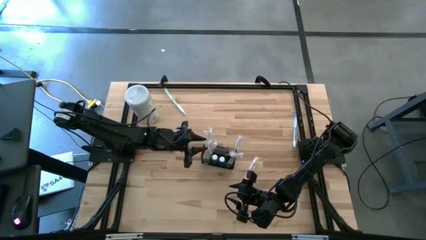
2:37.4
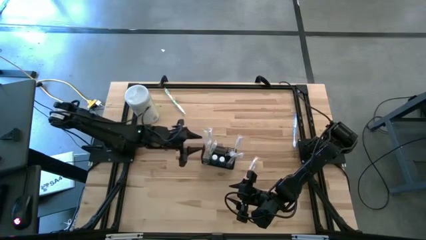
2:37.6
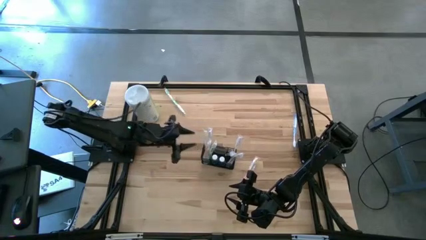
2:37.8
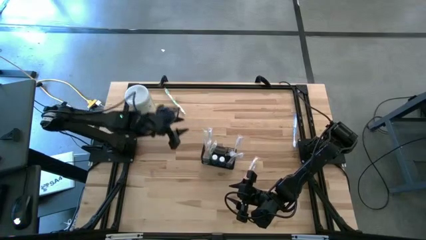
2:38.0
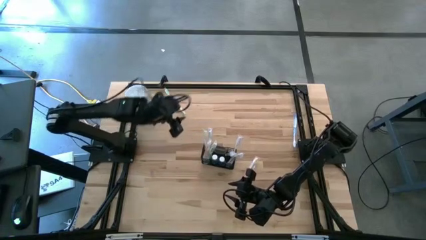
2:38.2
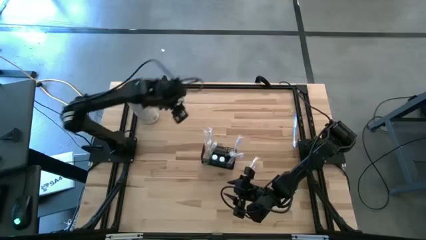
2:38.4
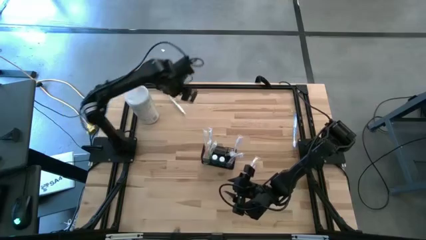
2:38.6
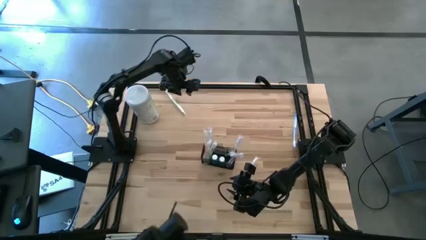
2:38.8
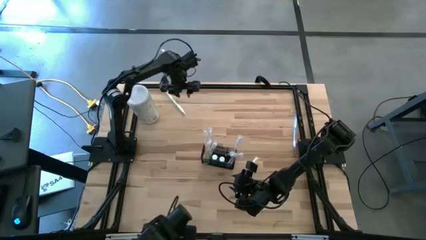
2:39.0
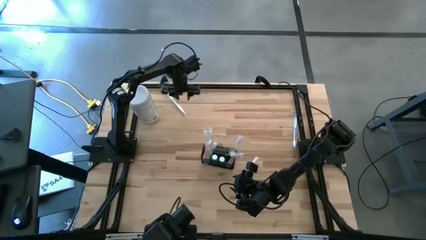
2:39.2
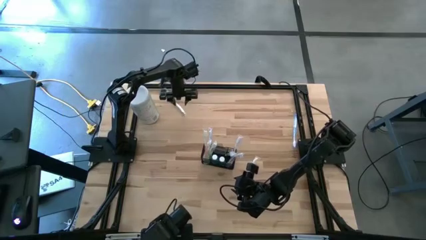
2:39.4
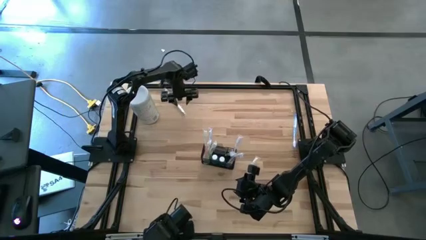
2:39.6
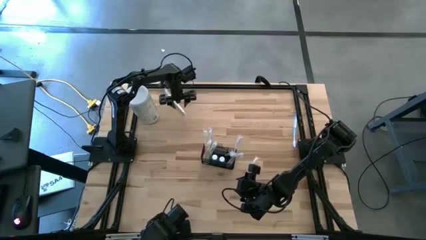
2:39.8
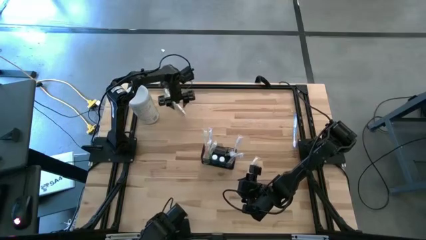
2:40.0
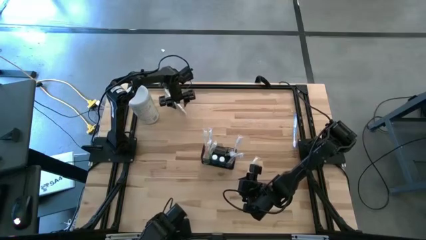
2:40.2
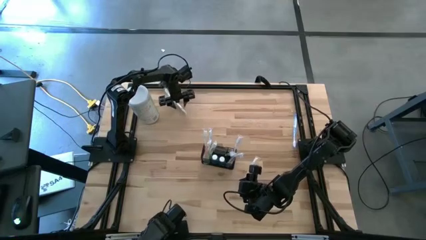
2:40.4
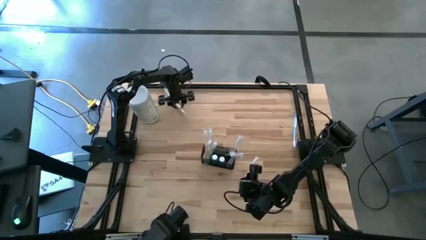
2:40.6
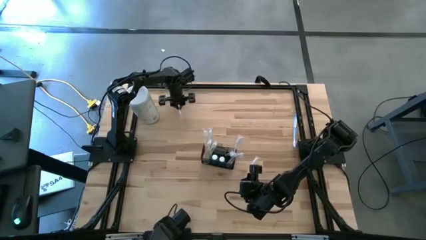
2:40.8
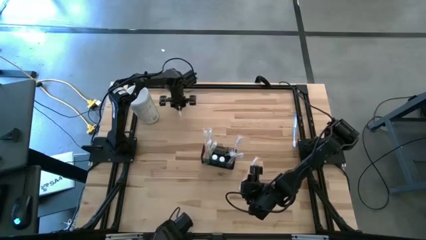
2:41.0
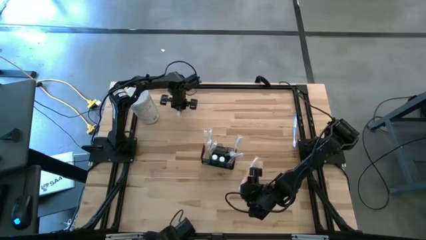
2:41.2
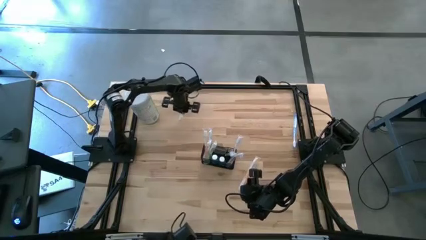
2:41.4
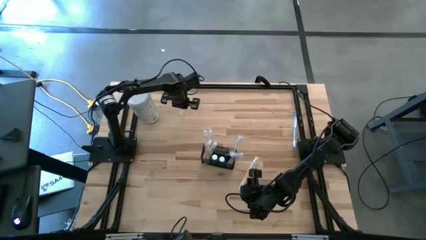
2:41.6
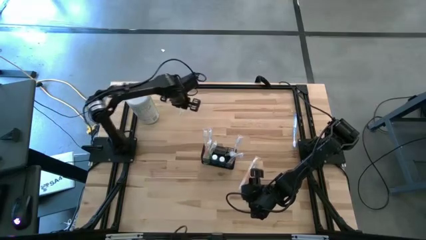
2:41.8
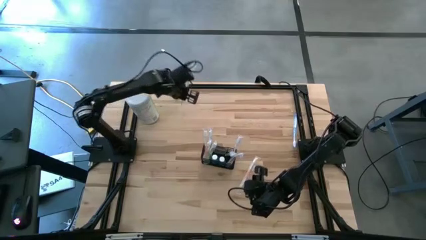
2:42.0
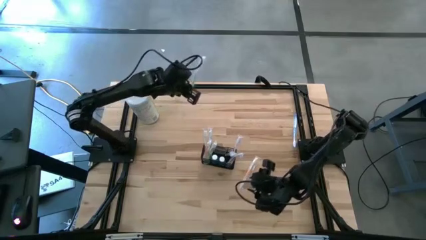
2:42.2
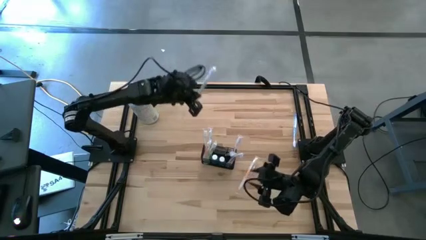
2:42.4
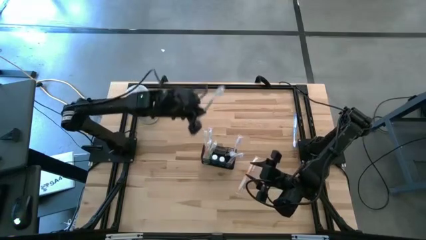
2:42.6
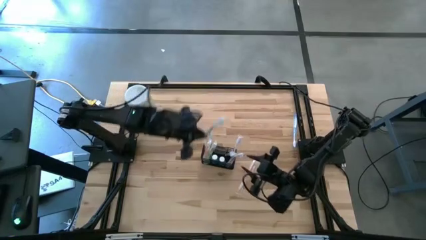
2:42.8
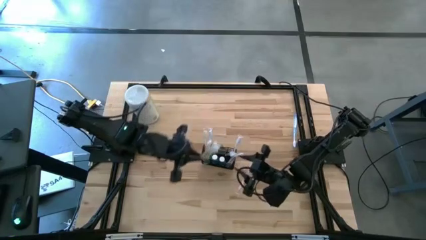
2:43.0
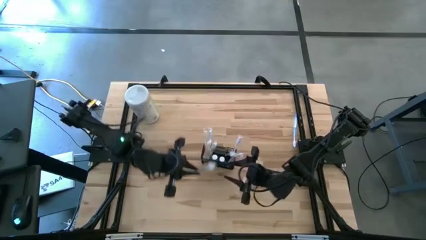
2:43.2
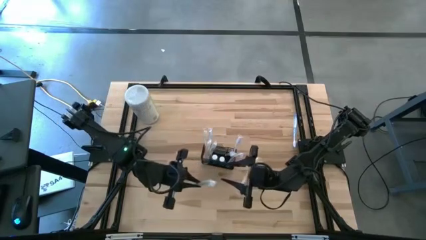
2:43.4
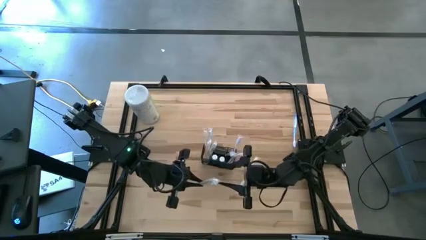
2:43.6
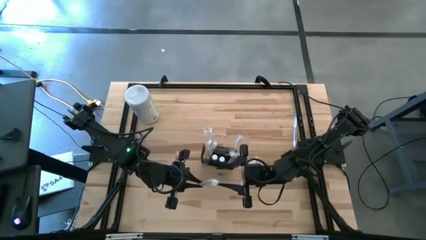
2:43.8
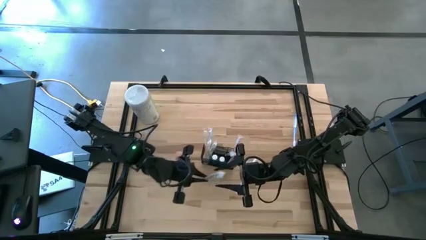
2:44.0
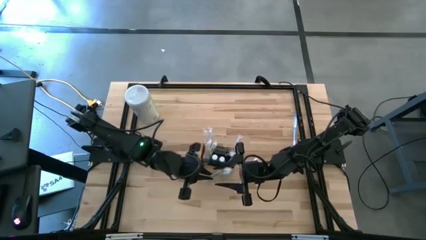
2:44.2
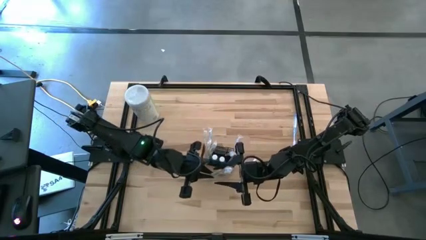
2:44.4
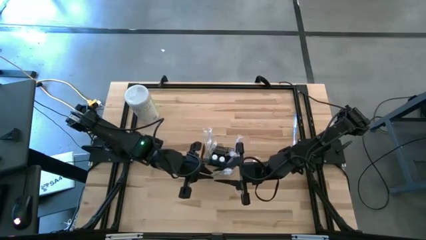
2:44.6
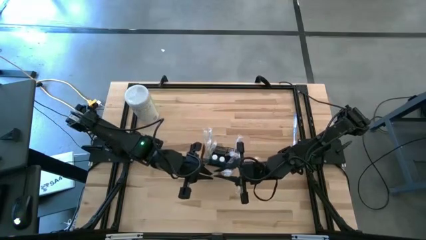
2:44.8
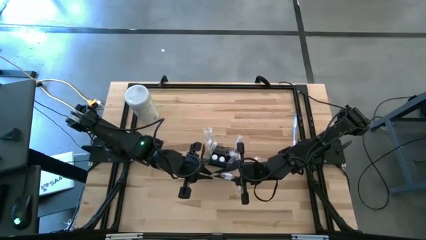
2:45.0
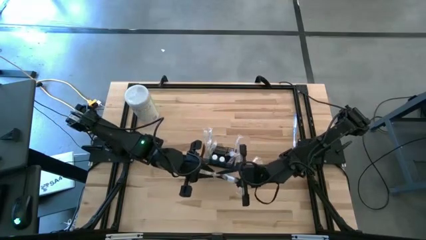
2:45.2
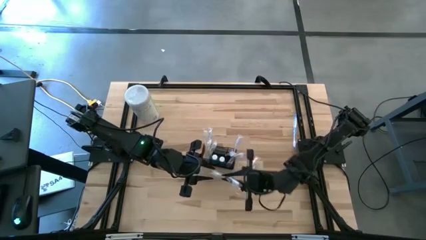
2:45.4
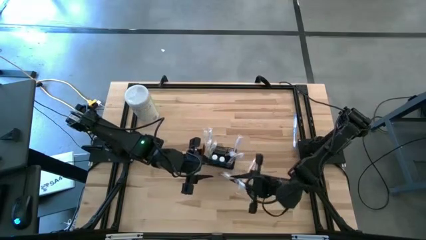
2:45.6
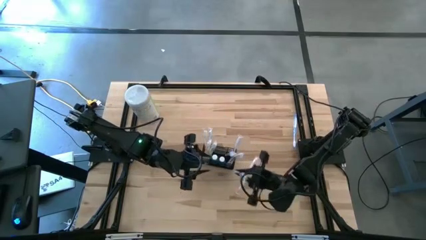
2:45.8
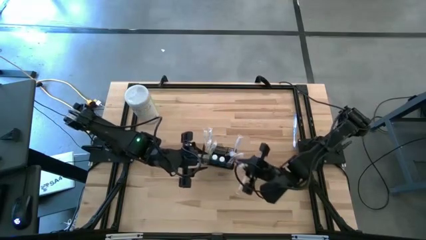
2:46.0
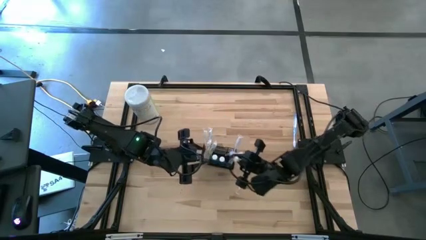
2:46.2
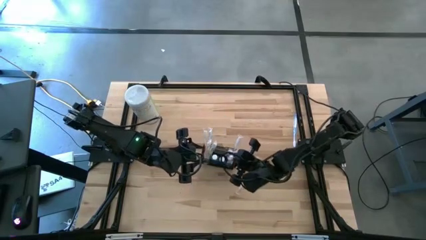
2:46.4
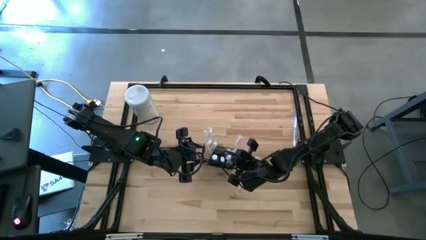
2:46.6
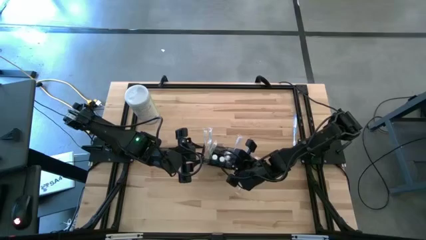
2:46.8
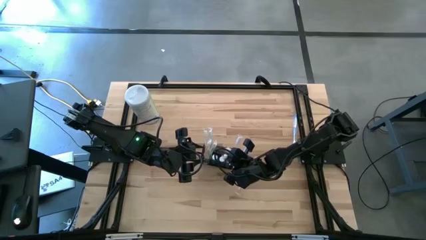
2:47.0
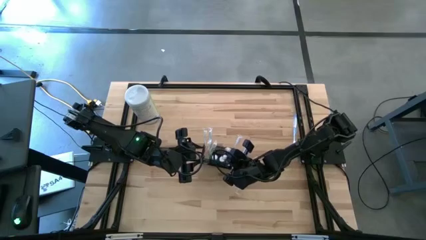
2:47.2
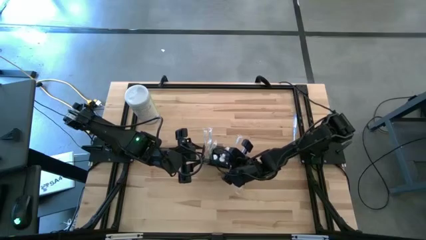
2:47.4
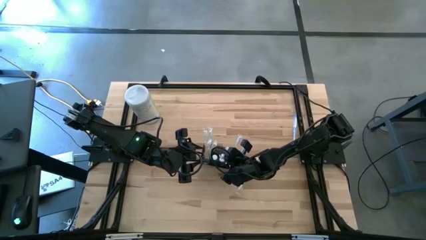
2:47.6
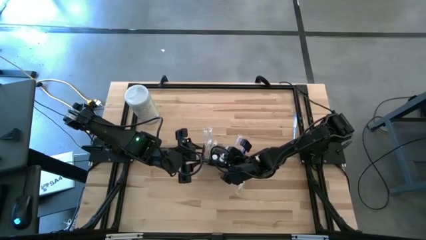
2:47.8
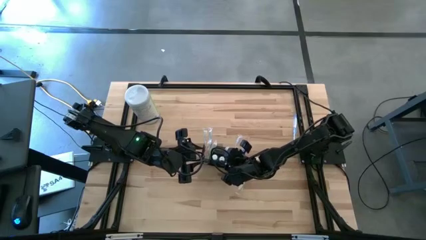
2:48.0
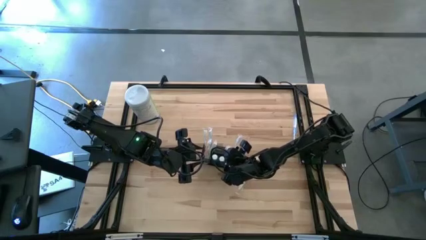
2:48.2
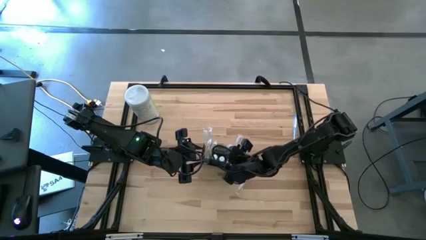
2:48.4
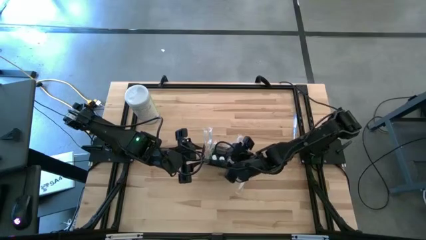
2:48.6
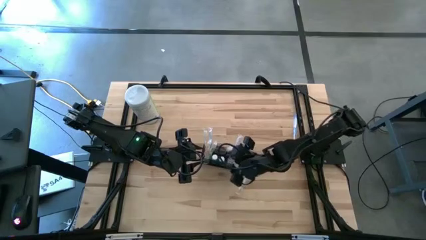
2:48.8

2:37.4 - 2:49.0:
Task: Pick & Place toothbrushing station
Put the green toothbrush into the mesh organizer
